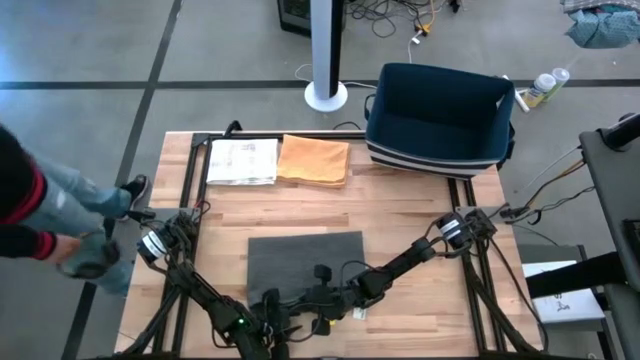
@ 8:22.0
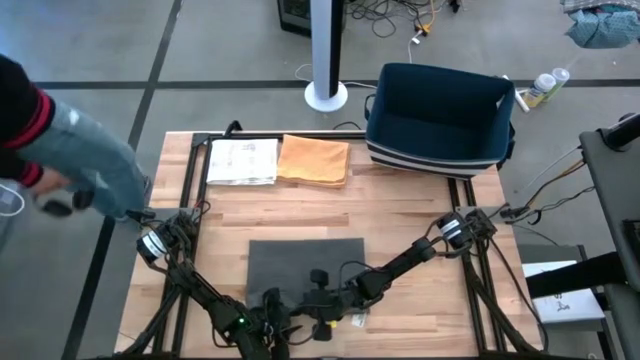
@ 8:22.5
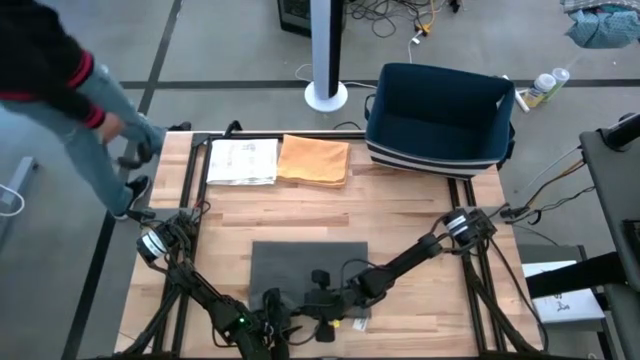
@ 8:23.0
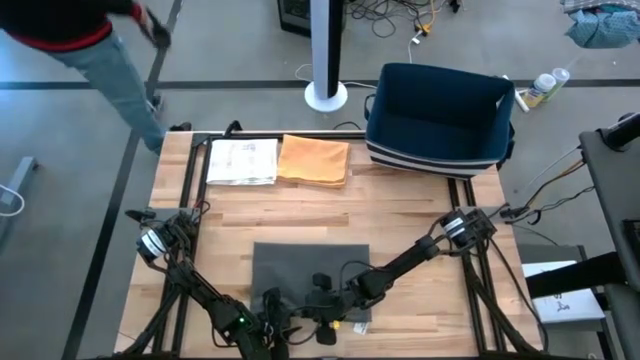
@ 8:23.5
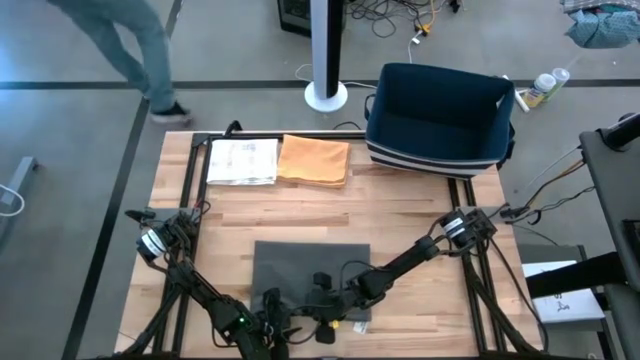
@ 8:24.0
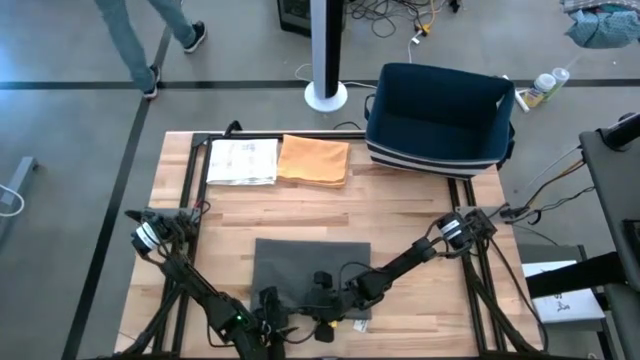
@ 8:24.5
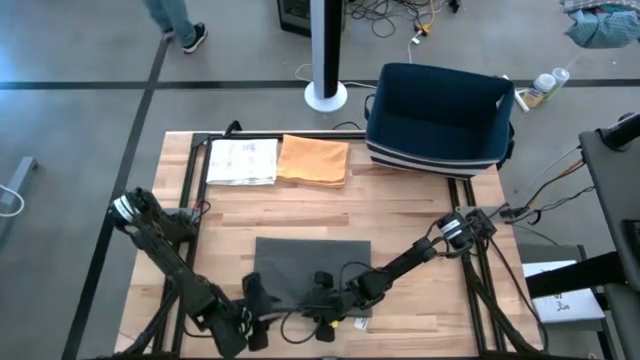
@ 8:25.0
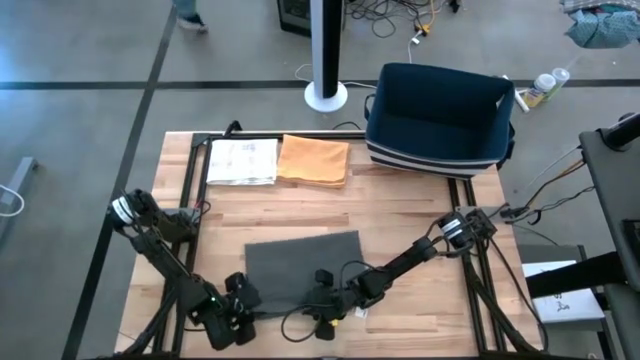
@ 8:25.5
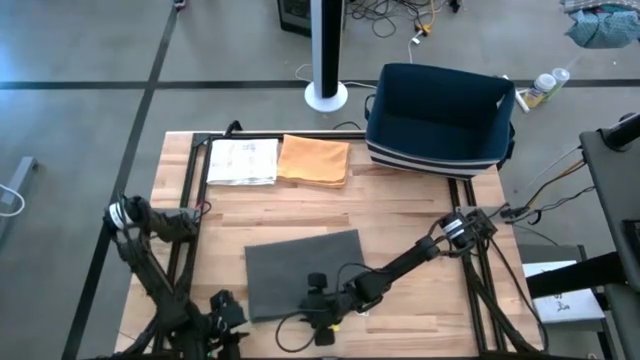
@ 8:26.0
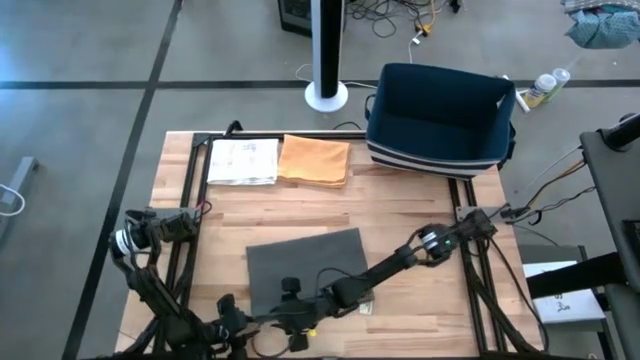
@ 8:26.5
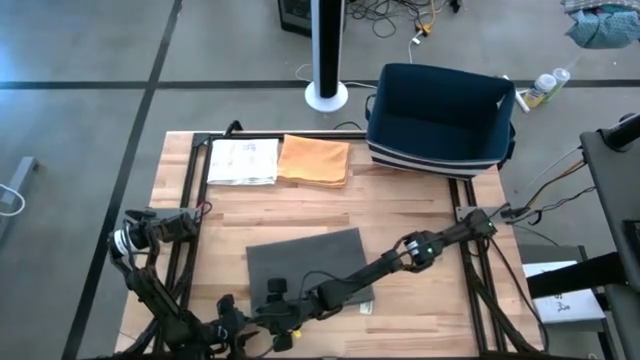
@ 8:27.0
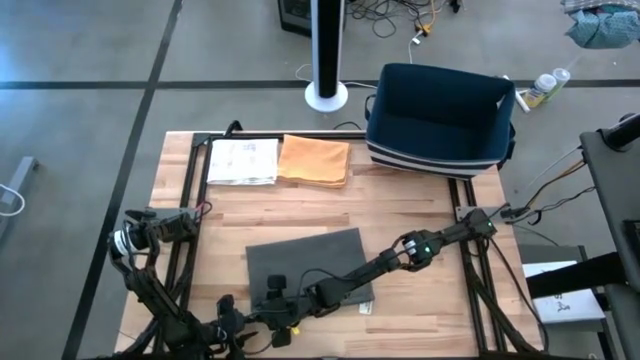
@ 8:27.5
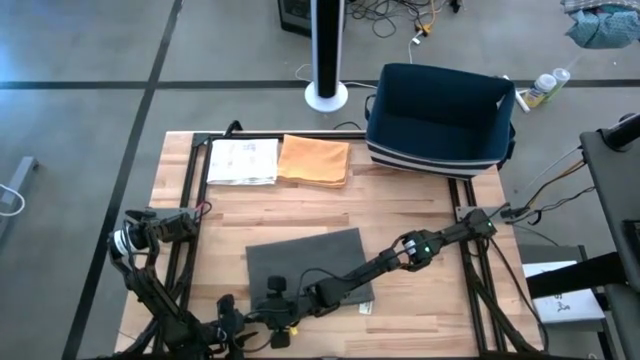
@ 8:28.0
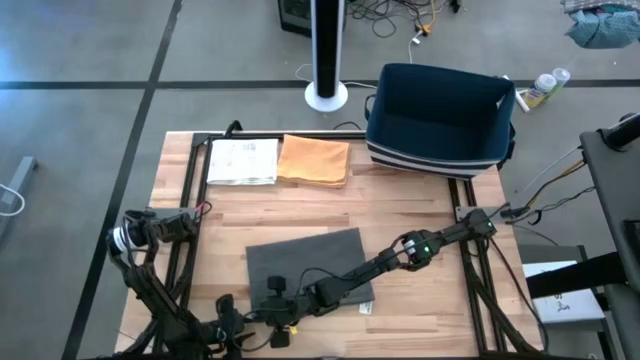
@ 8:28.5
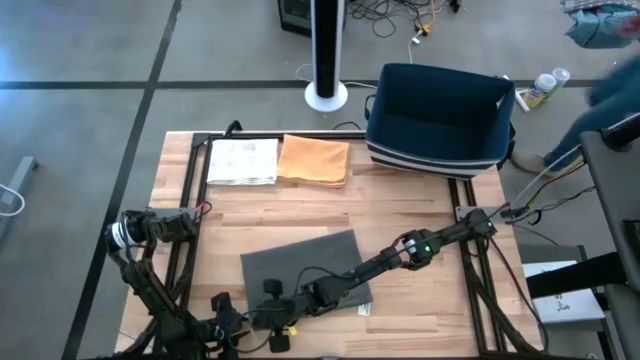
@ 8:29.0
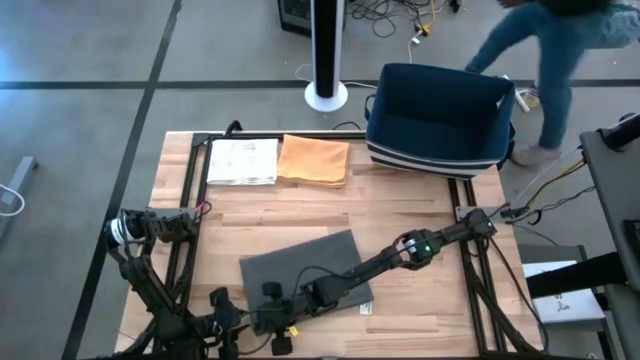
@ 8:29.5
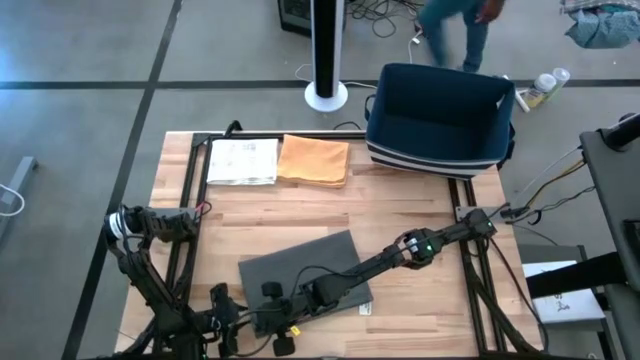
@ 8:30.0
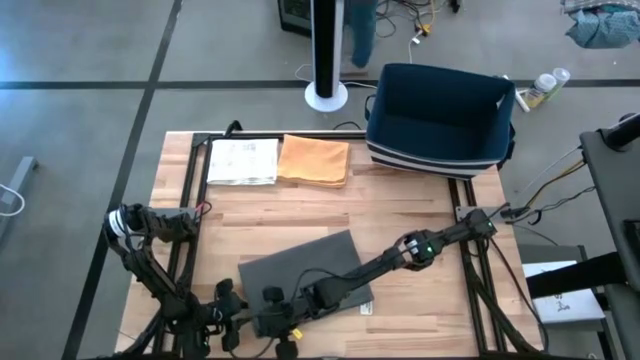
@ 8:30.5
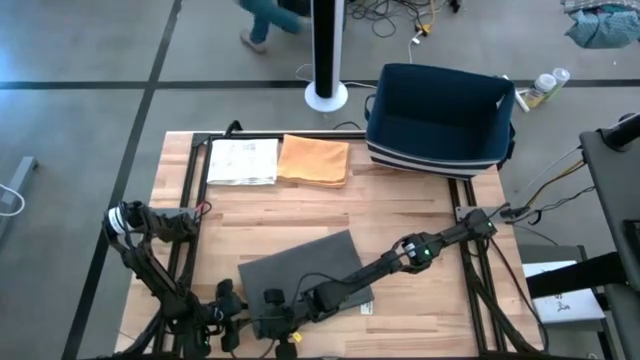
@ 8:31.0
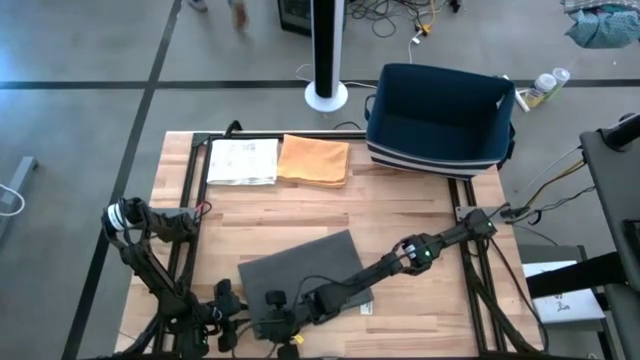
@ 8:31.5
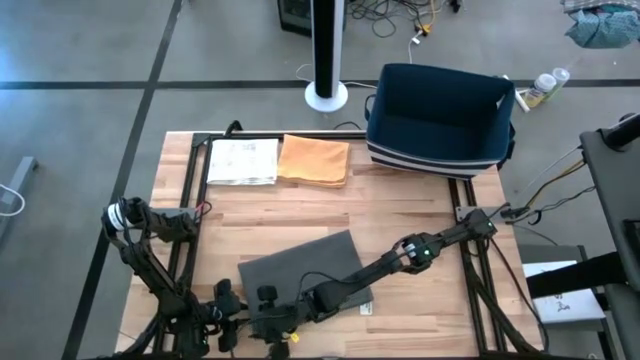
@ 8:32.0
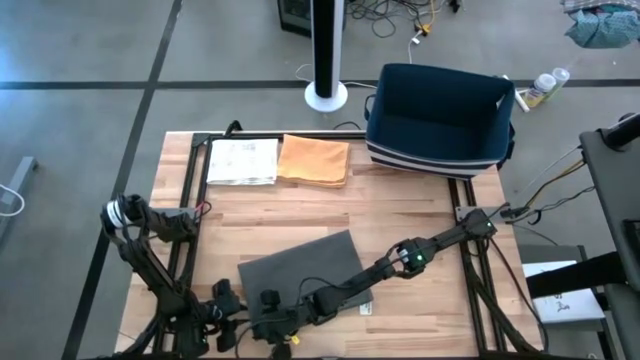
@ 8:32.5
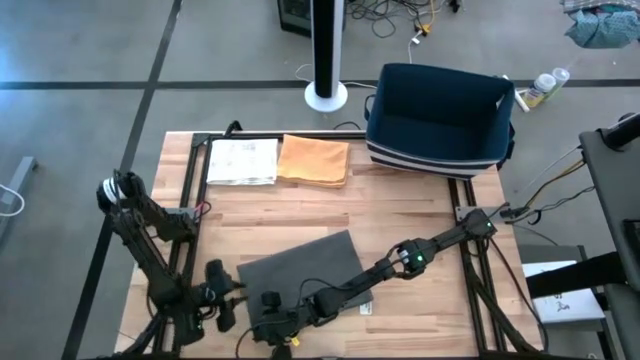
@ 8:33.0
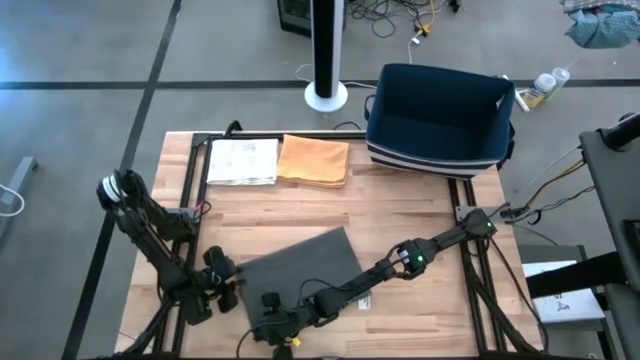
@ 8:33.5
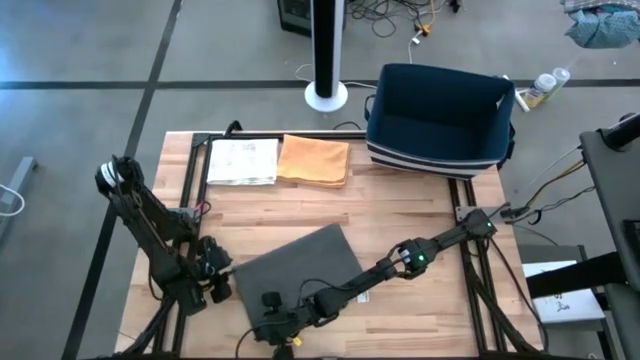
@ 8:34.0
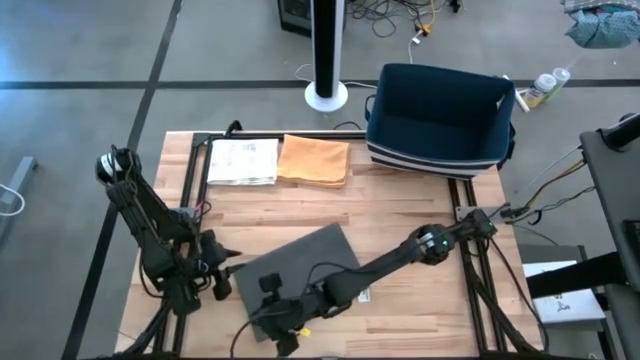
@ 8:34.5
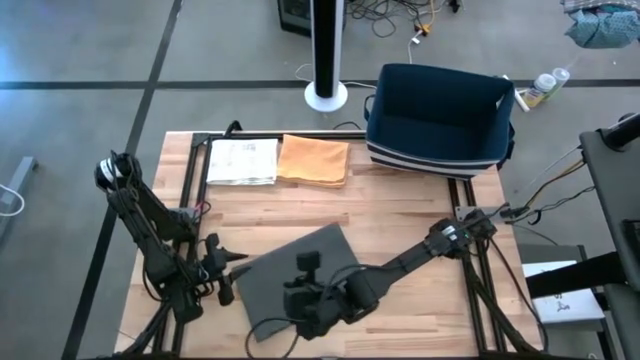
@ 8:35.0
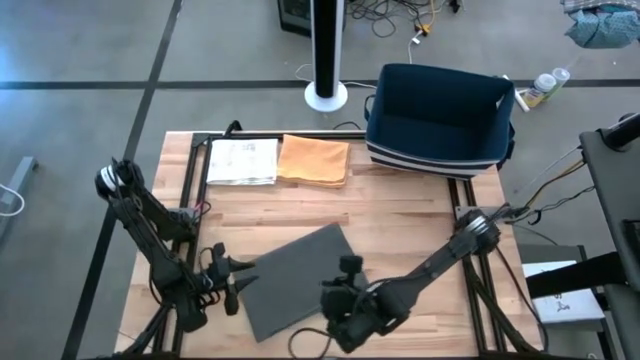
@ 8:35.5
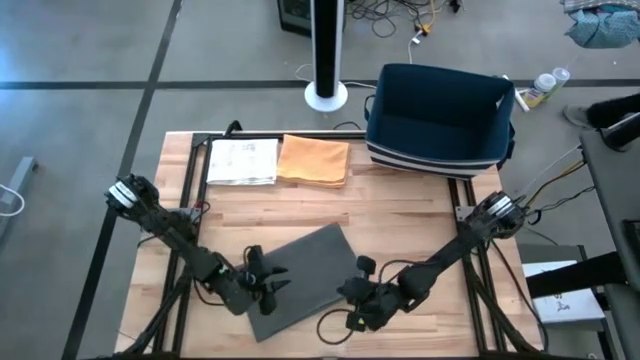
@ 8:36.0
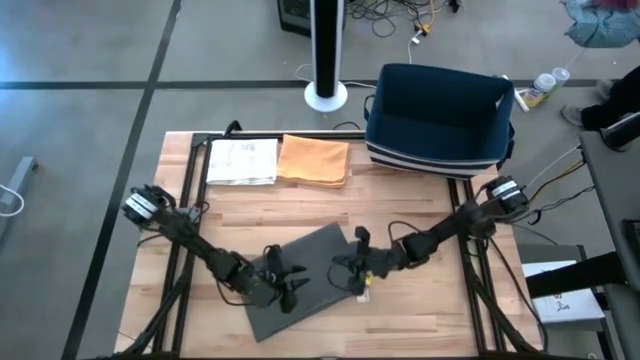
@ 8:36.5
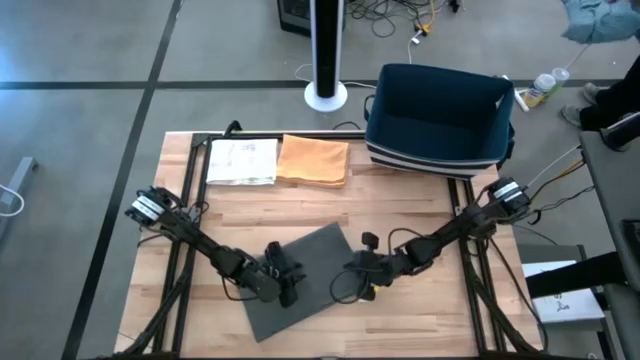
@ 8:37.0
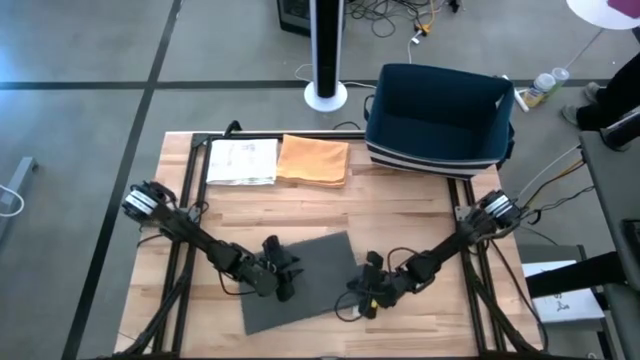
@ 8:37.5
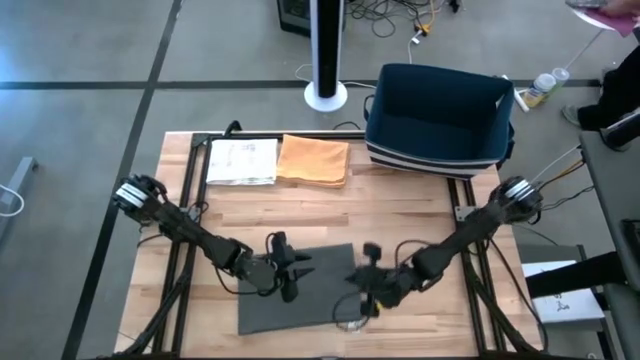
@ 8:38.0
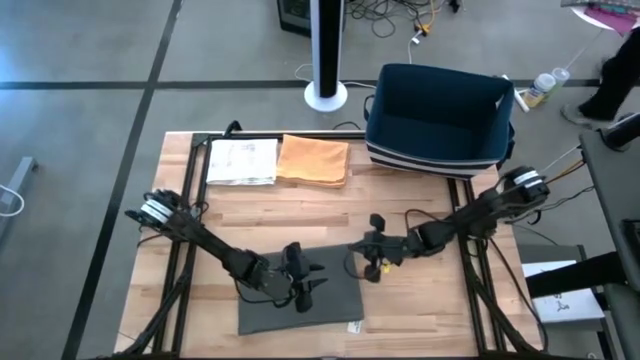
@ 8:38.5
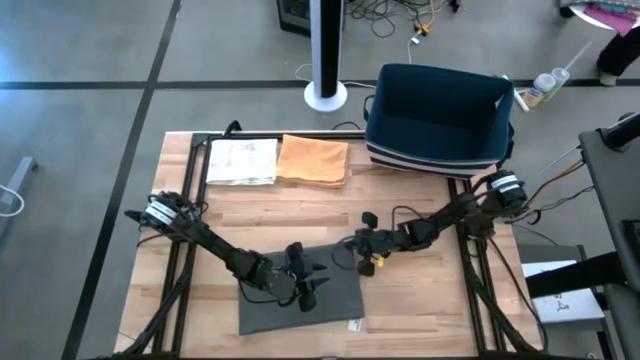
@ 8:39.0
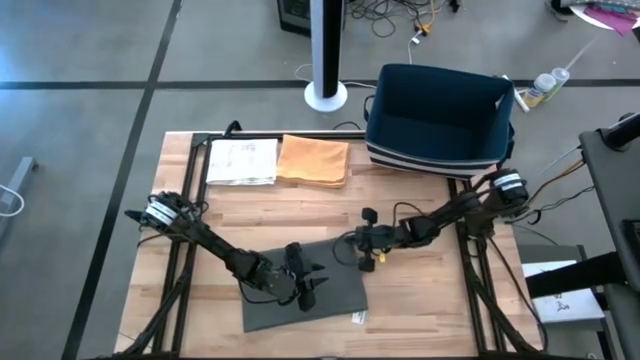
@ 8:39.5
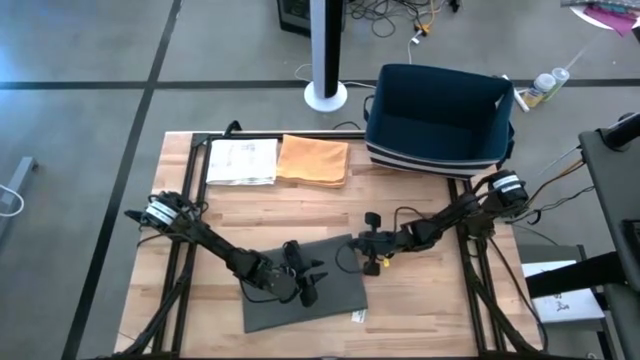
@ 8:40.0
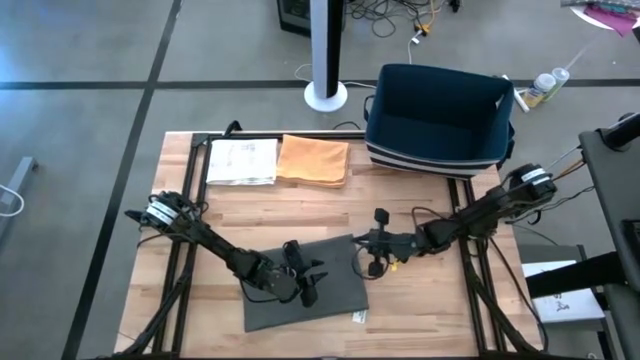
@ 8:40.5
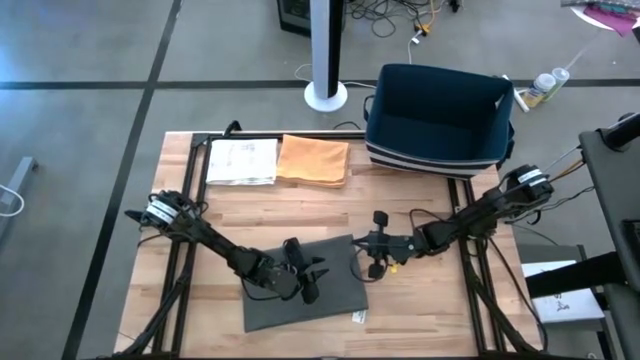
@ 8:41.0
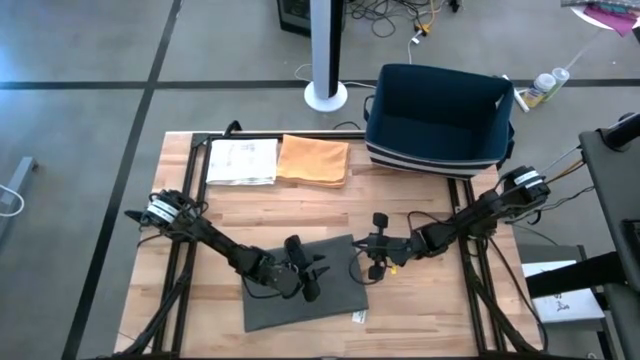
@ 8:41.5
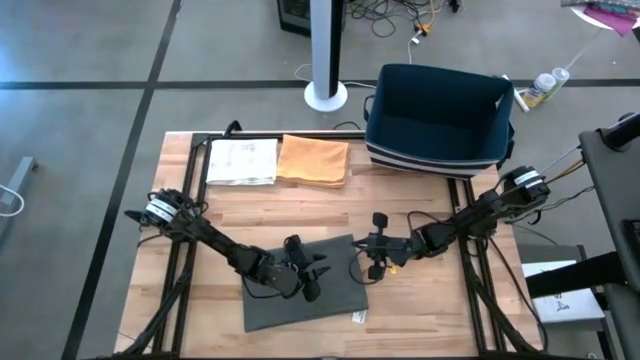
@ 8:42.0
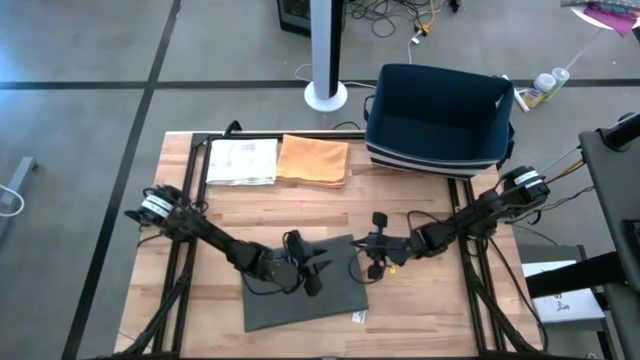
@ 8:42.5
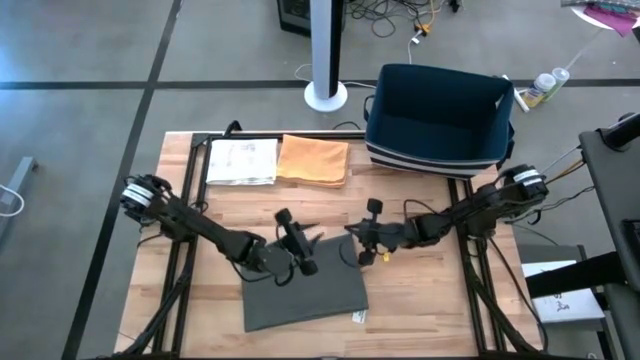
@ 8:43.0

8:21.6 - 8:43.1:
Task: Fold towel
Fold the black towel
